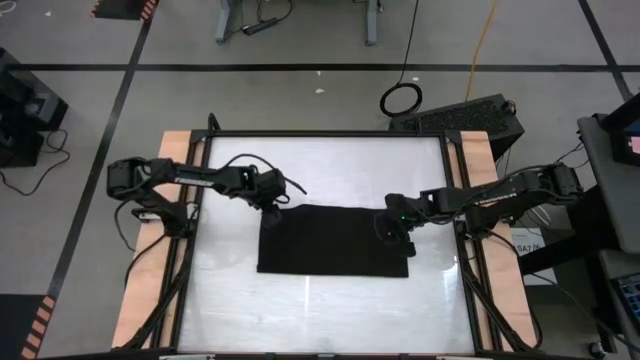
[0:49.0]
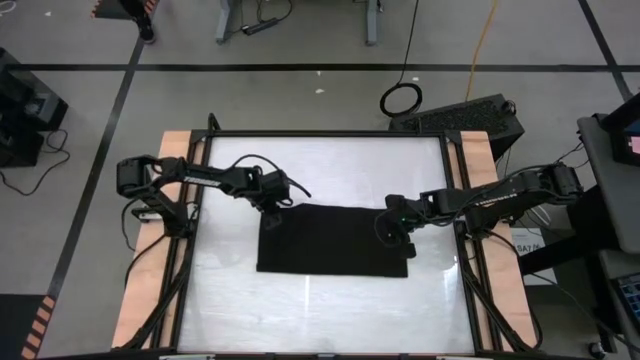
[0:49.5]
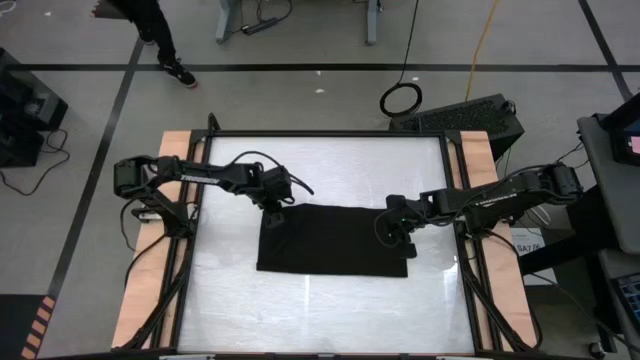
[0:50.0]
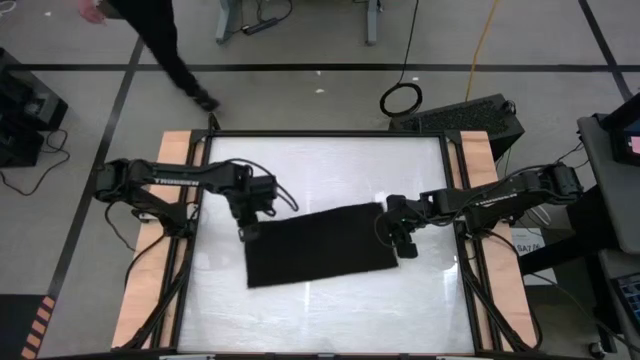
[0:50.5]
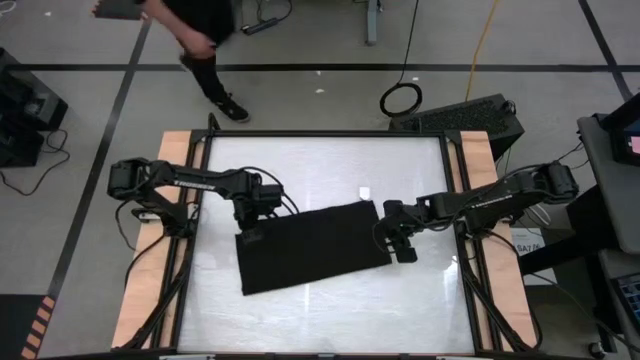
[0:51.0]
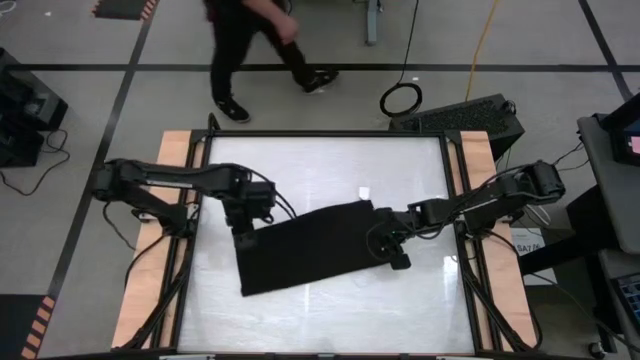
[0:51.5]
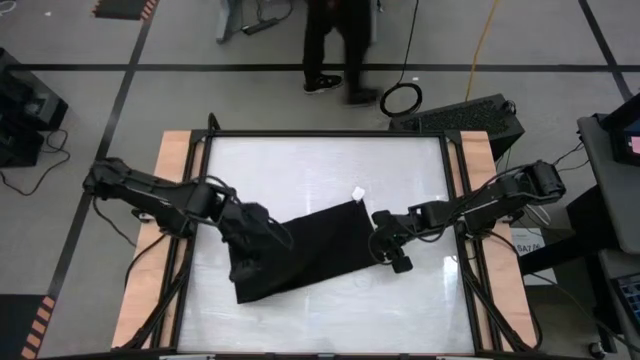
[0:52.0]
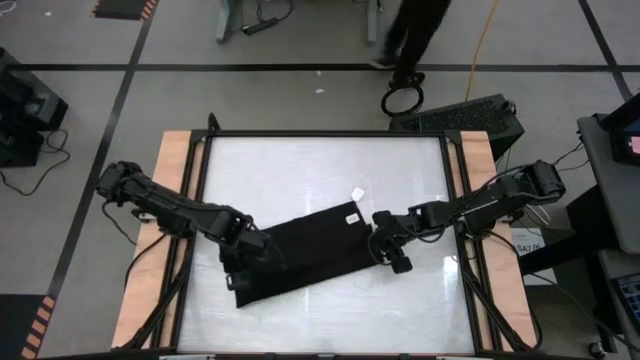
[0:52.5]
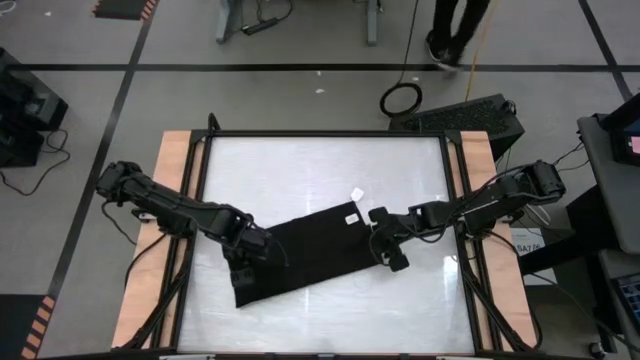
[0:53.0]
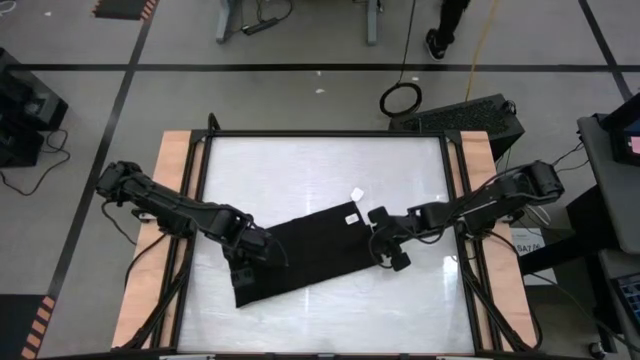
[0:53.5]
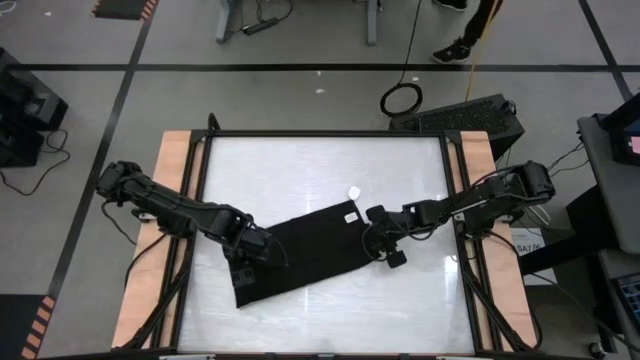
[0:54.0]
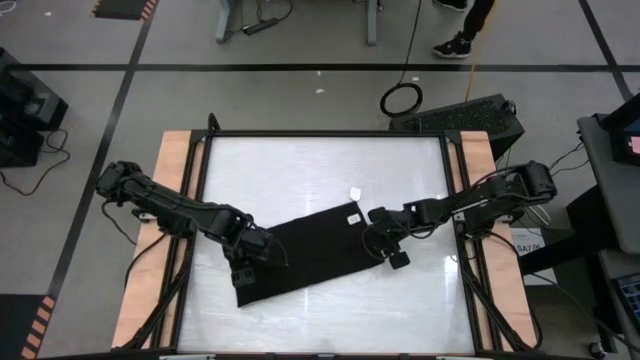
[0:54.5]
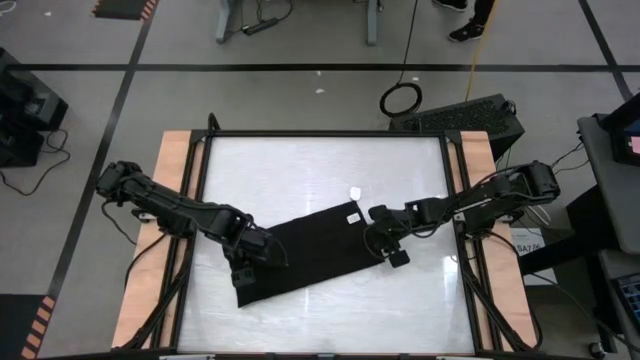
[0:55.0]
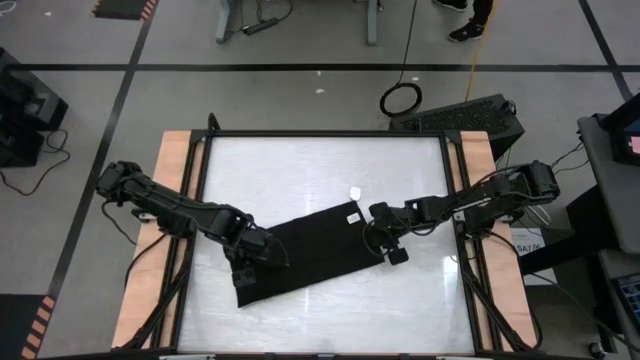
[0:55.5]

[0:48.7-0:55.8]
Task: Roll towel
Roll the towel

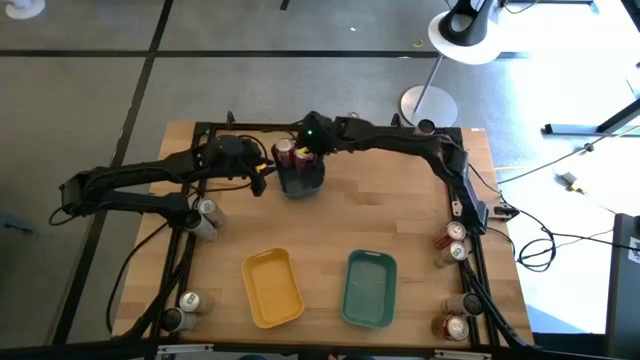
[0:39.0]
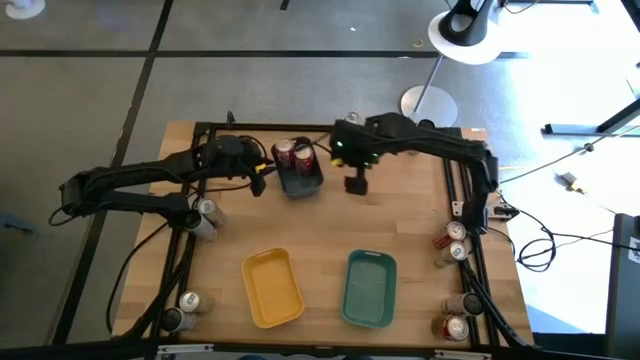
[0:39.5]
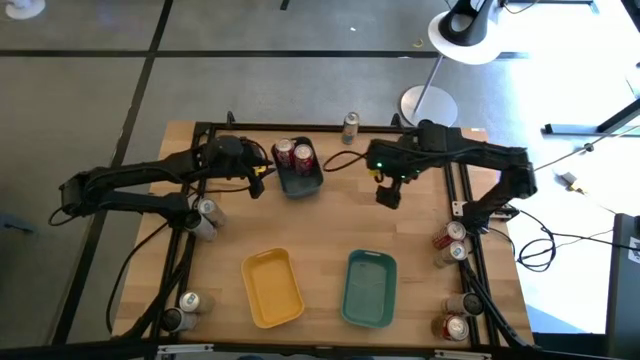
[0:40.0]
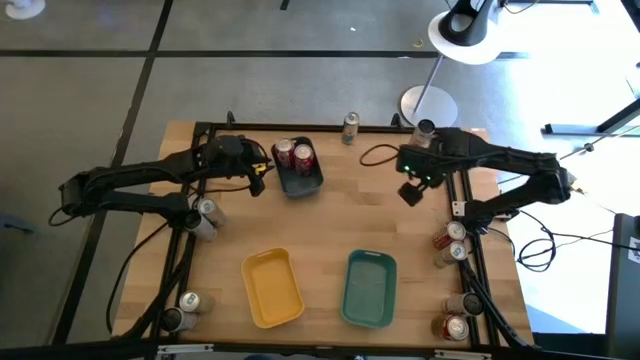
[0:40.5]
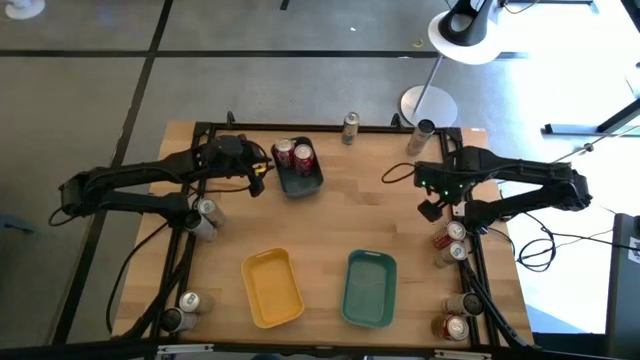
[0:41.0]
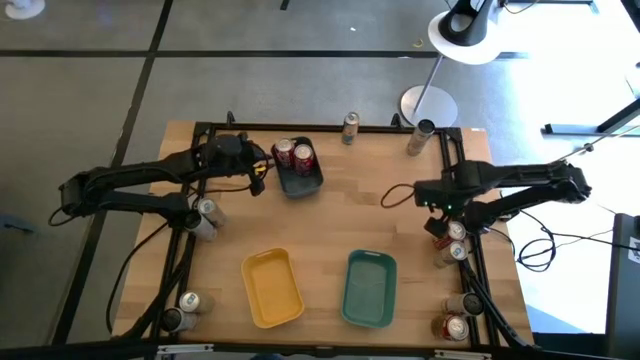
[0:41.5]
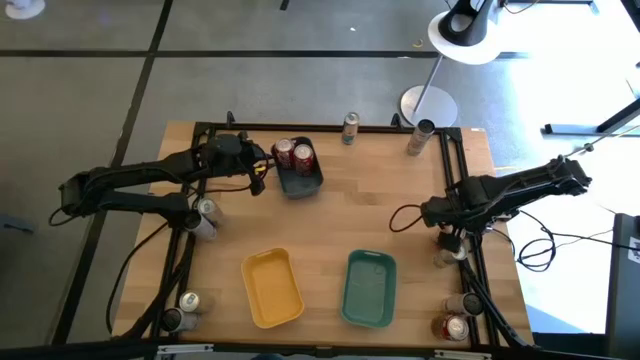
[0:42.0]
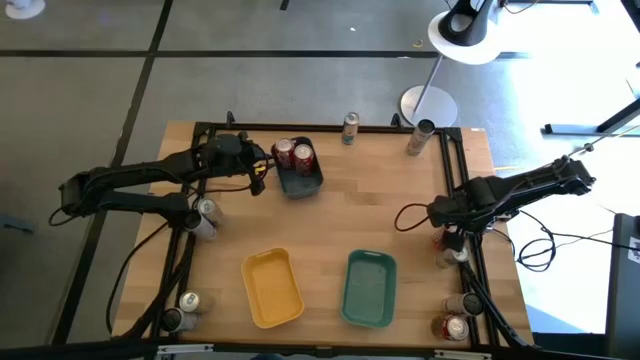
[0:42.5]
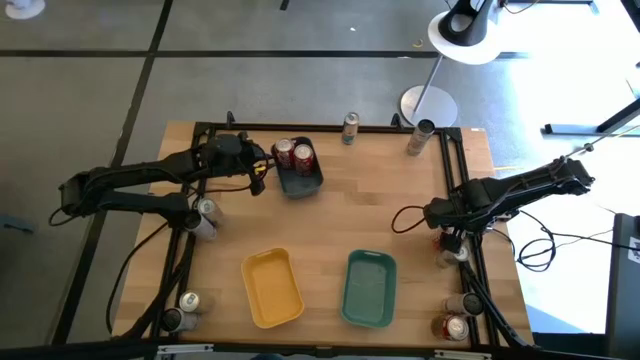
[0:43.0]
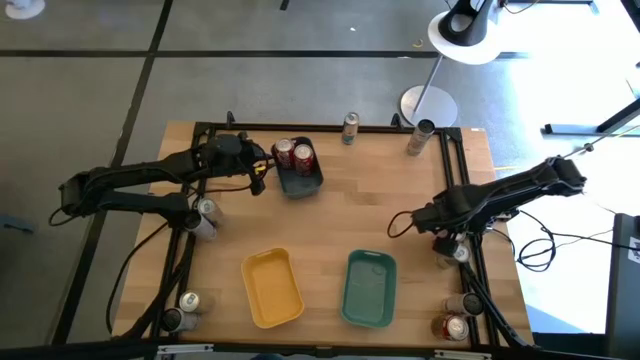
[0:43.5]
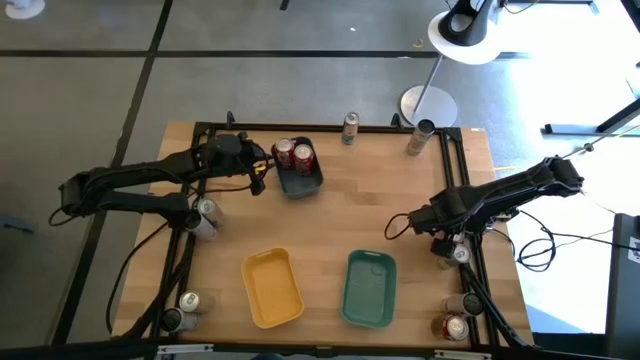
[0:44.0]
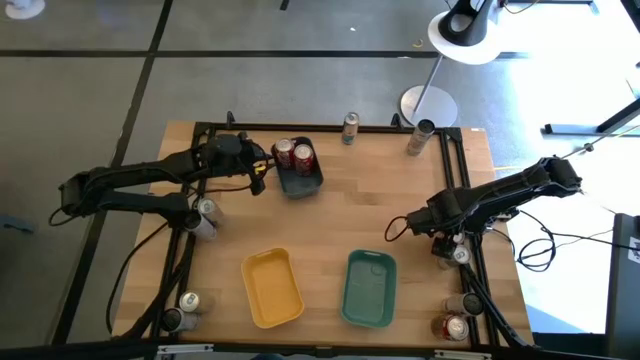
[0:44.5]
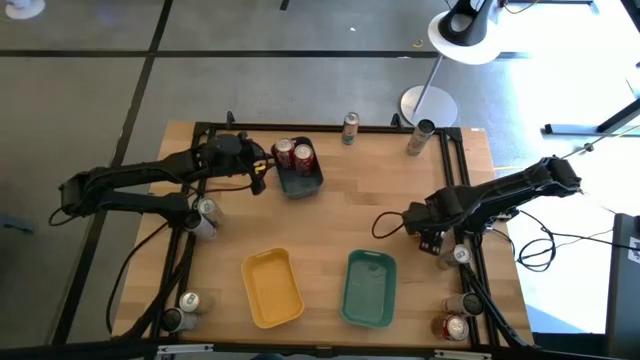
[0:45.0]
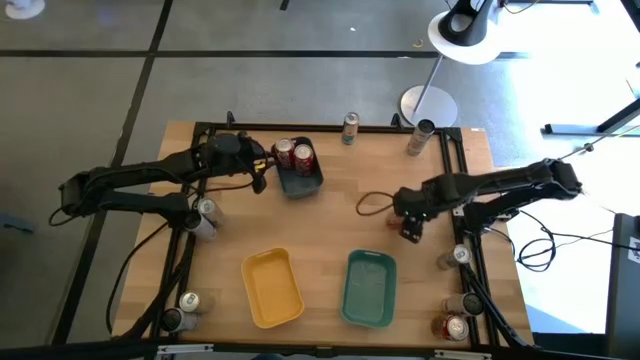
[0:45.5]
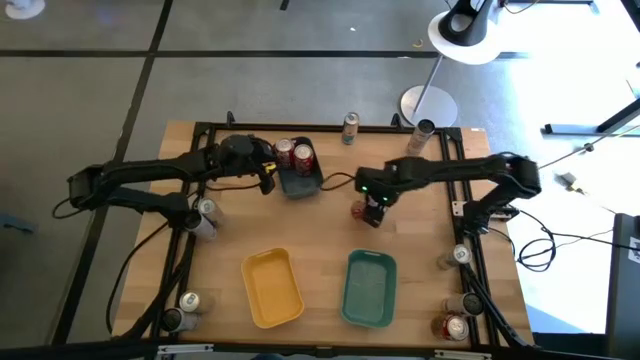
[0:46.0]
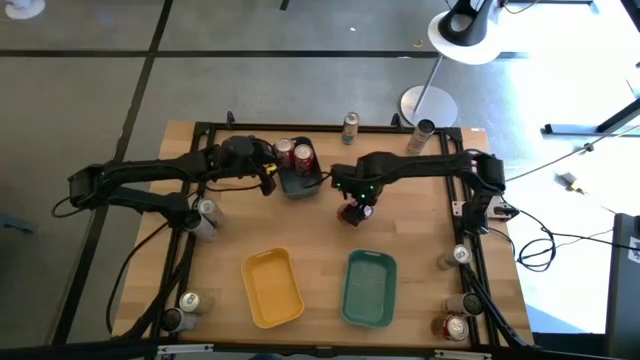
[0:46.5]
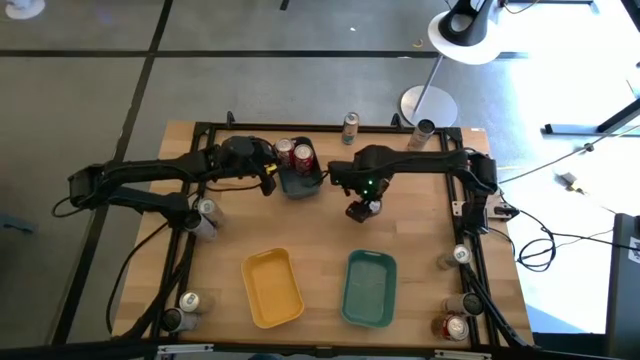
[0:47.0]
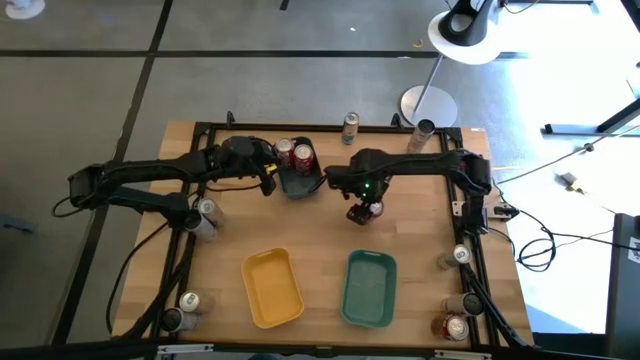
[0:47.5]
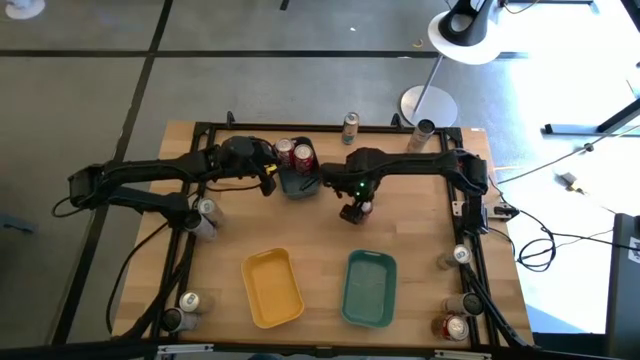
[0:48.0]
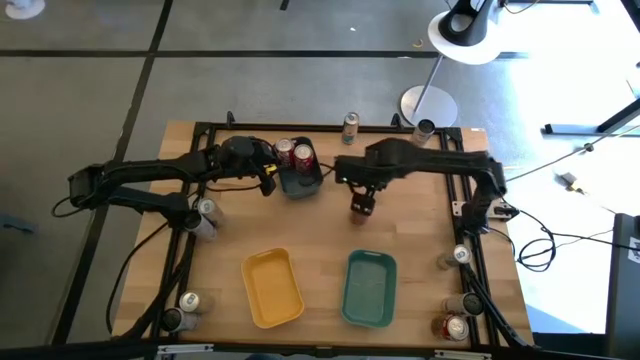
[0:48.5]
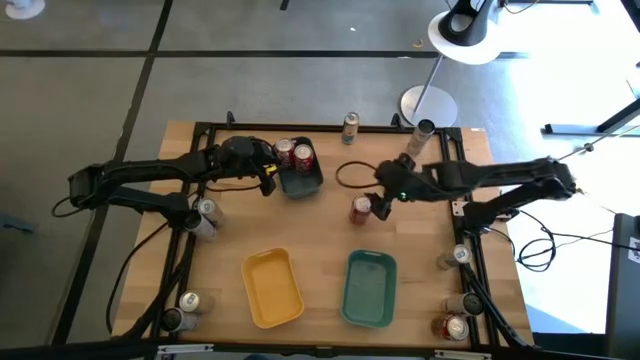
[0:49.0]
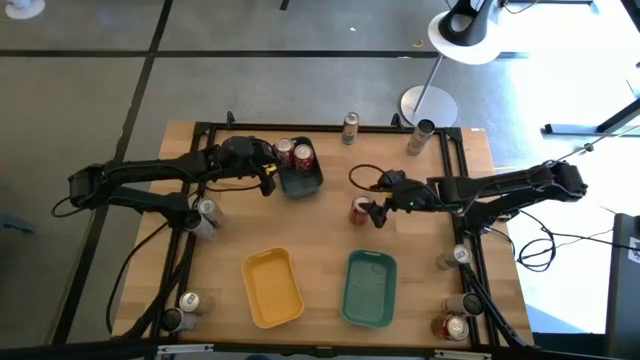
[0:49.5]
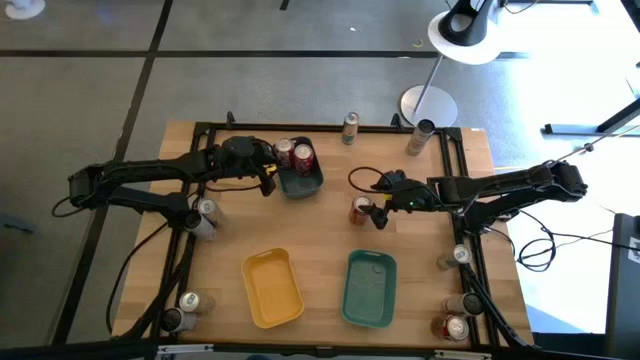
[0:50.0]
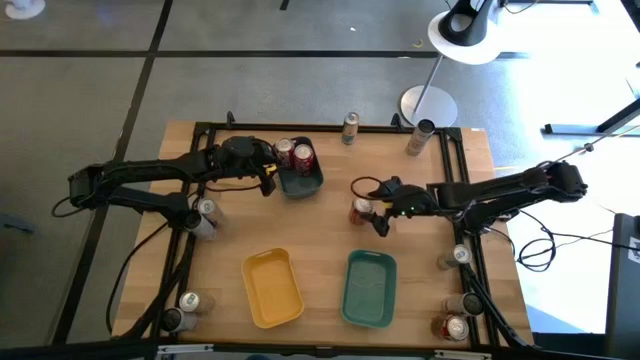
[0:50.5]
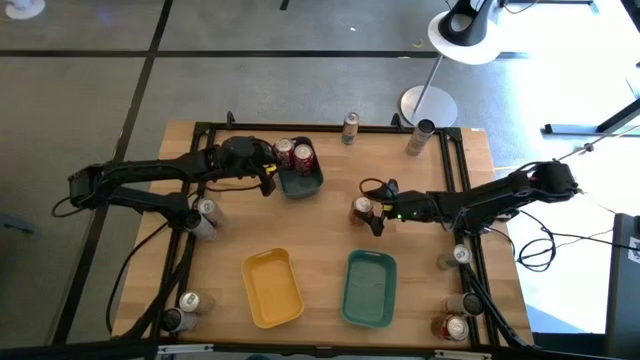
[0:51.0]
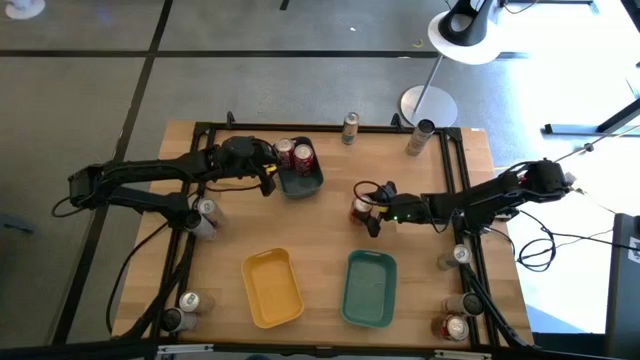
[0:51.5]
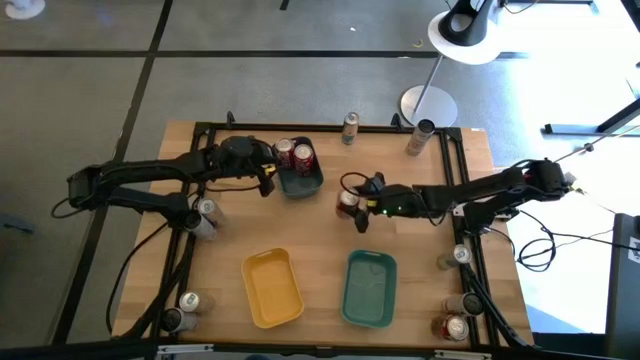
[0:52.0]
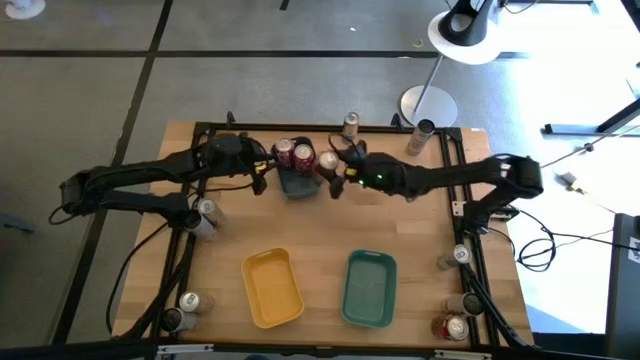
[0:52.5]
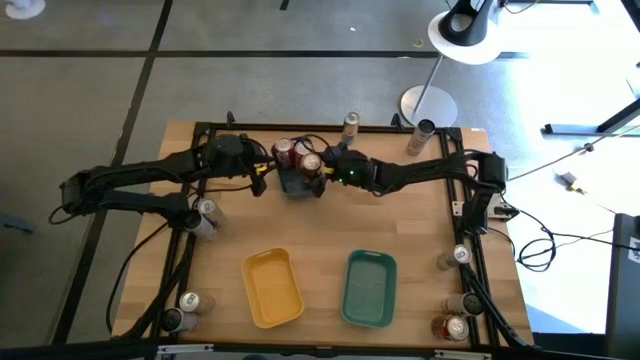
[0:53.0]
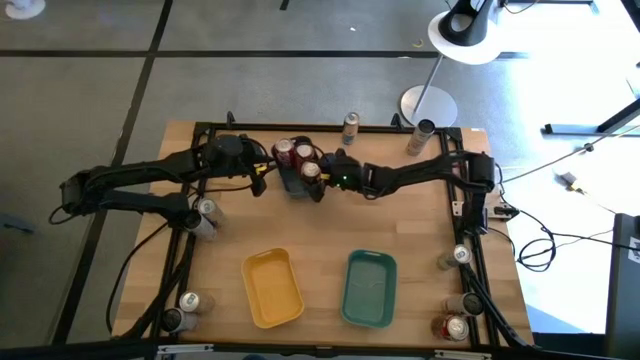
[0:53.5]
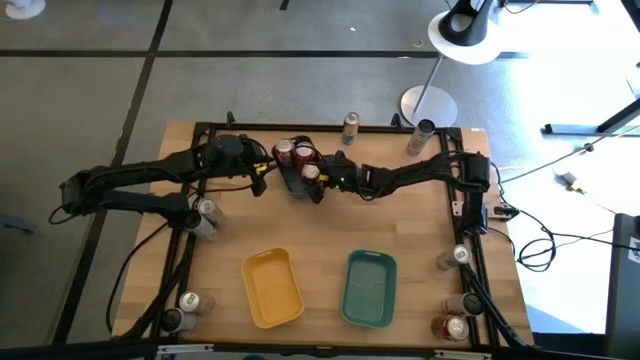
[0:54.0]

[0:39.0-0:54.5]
Task: Sort soda cans
Put the red and white soda can into the blue bin
